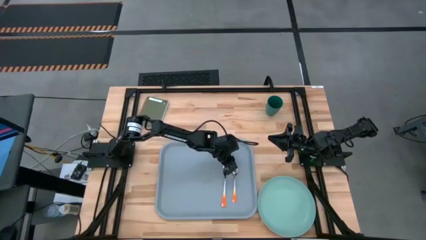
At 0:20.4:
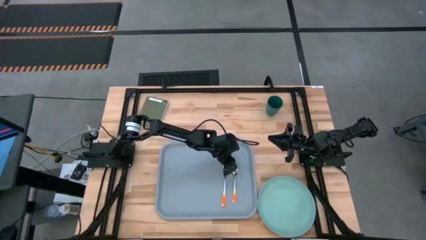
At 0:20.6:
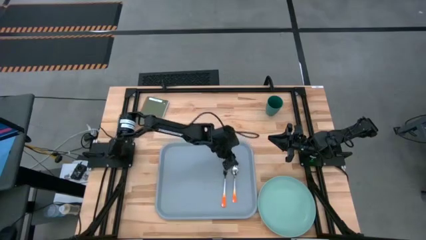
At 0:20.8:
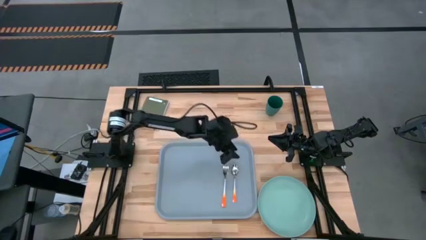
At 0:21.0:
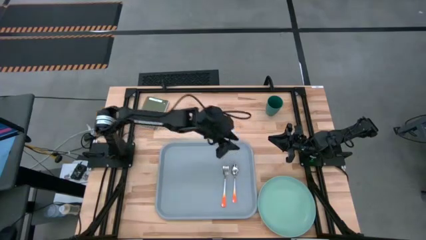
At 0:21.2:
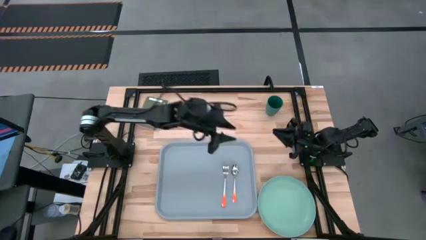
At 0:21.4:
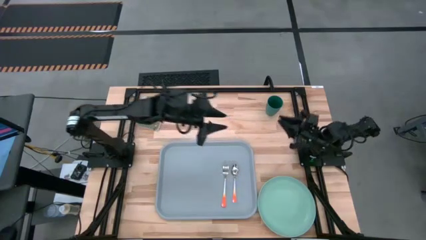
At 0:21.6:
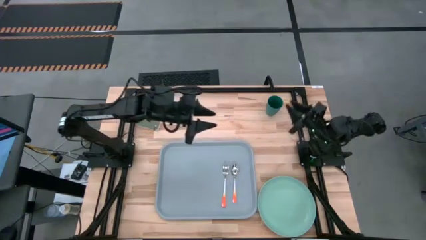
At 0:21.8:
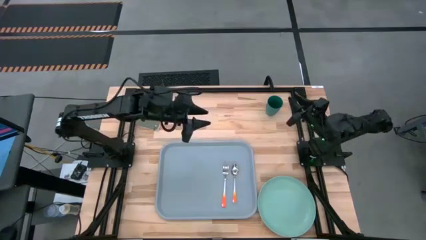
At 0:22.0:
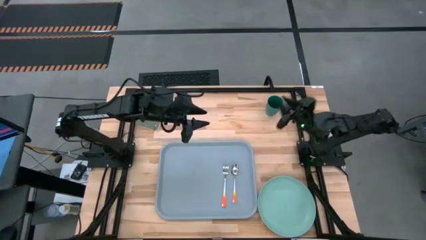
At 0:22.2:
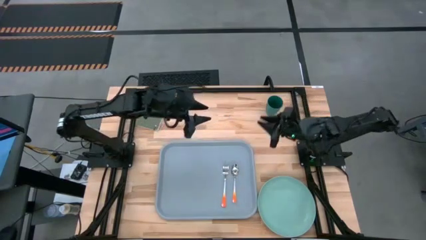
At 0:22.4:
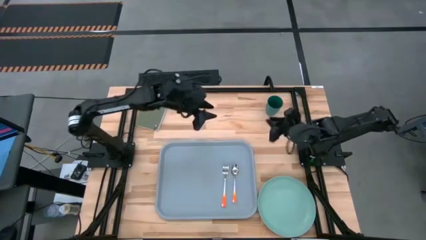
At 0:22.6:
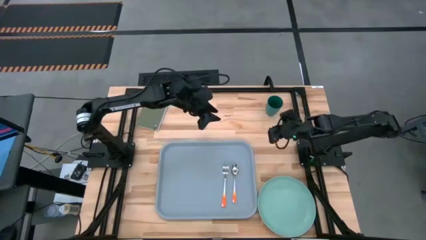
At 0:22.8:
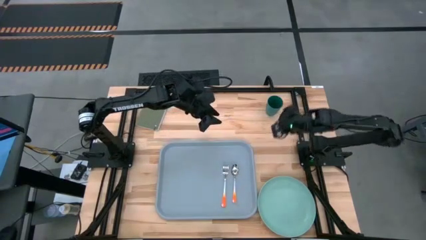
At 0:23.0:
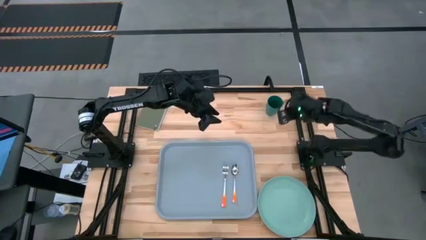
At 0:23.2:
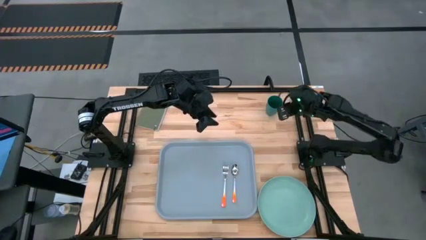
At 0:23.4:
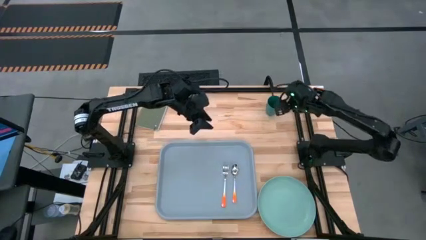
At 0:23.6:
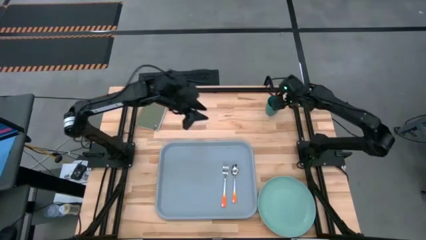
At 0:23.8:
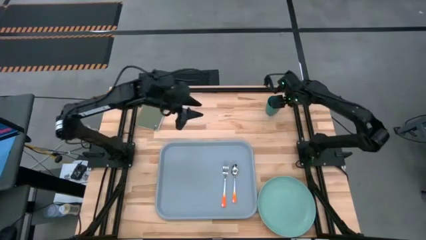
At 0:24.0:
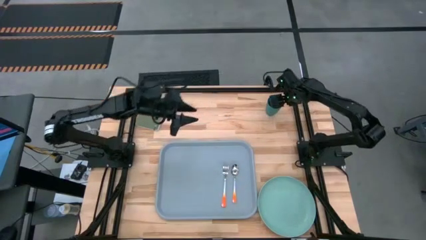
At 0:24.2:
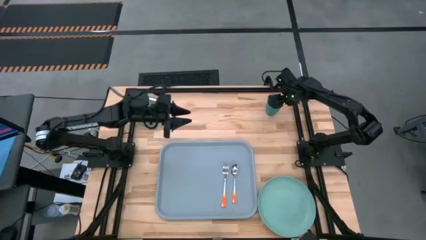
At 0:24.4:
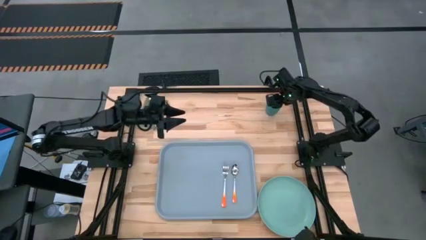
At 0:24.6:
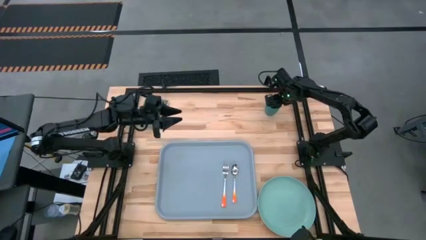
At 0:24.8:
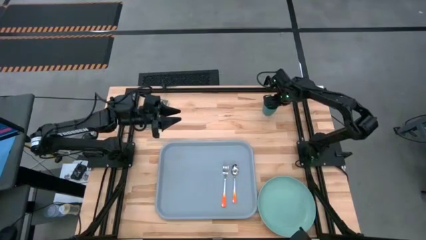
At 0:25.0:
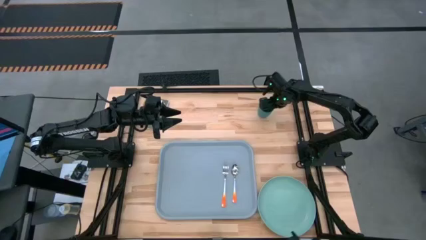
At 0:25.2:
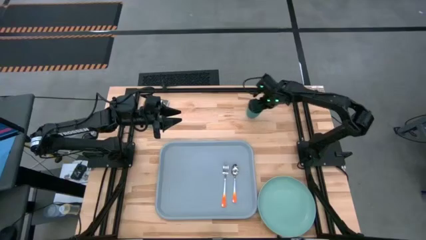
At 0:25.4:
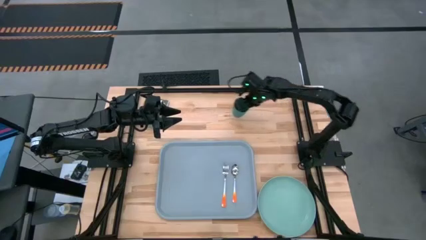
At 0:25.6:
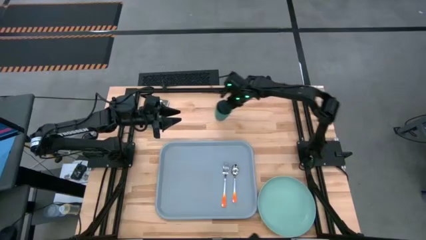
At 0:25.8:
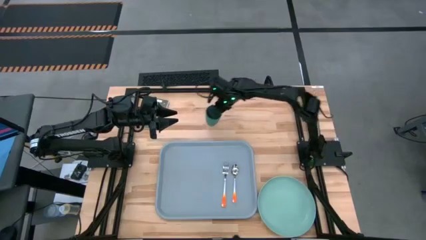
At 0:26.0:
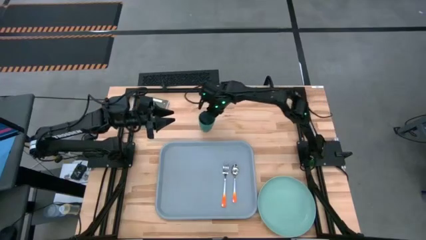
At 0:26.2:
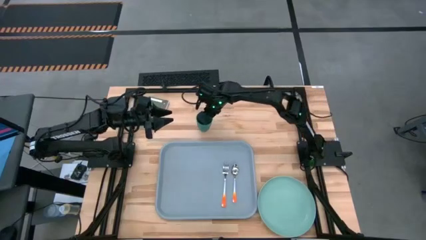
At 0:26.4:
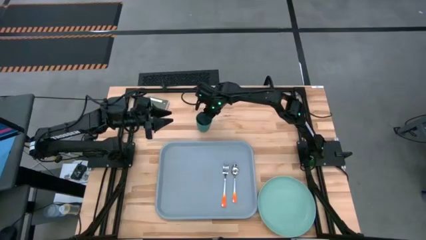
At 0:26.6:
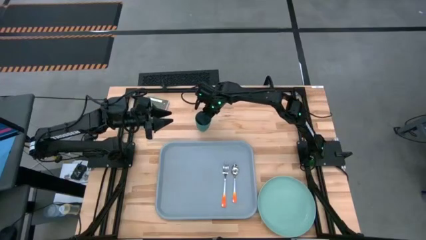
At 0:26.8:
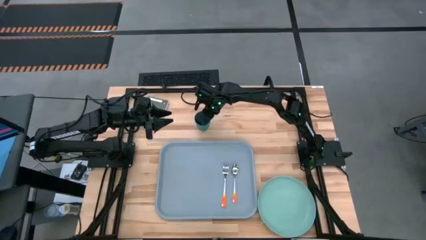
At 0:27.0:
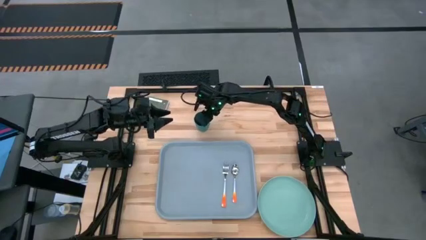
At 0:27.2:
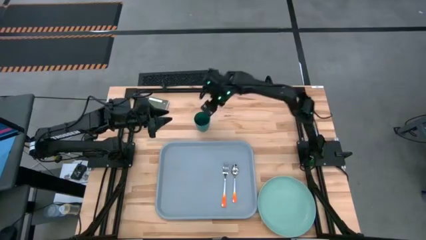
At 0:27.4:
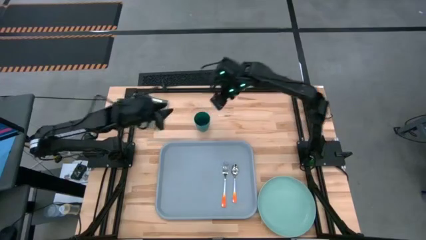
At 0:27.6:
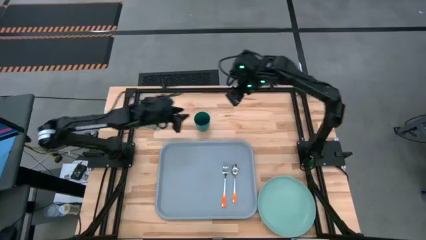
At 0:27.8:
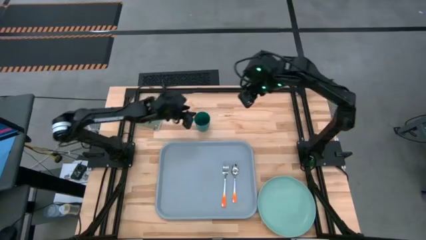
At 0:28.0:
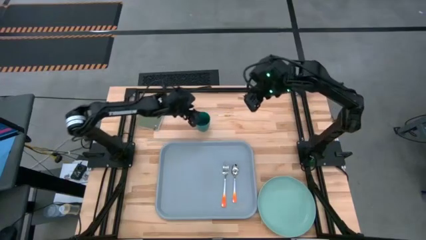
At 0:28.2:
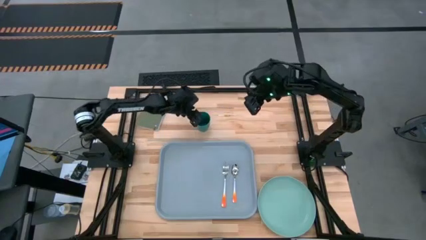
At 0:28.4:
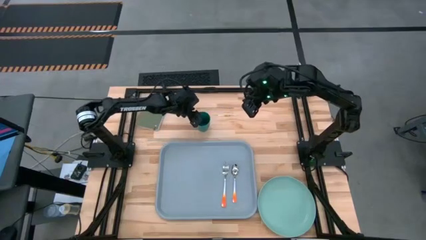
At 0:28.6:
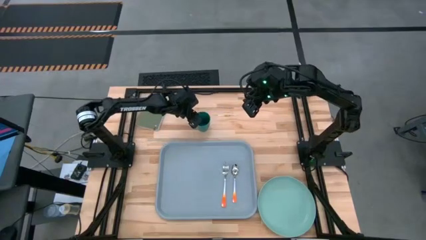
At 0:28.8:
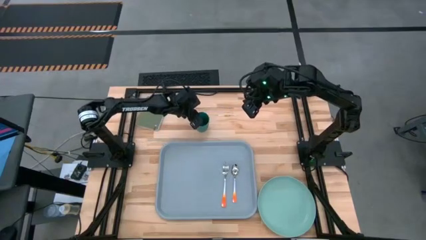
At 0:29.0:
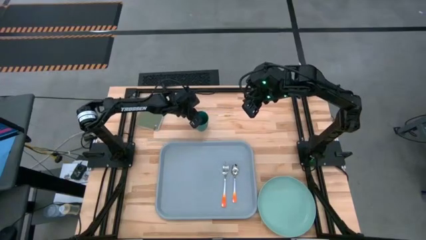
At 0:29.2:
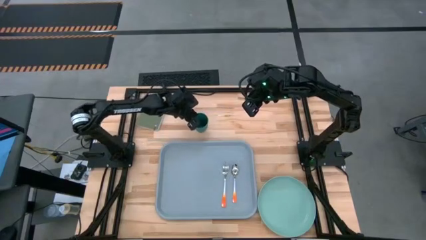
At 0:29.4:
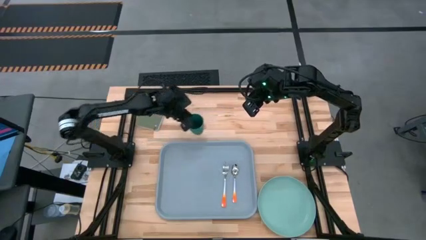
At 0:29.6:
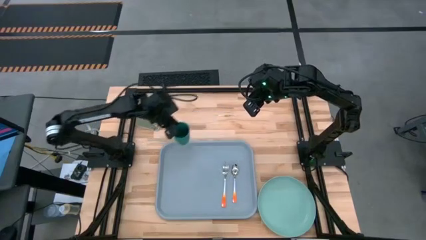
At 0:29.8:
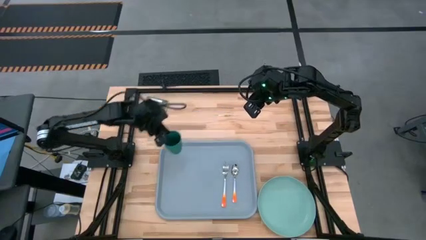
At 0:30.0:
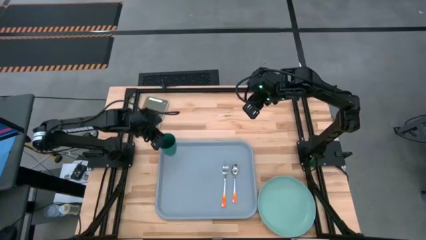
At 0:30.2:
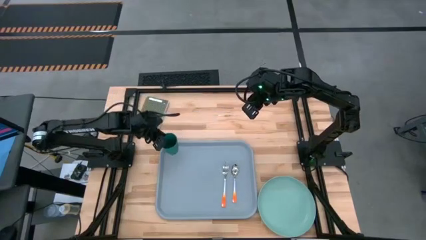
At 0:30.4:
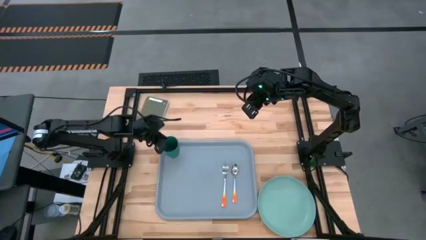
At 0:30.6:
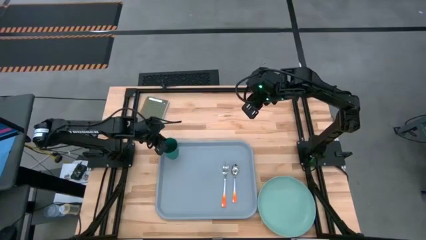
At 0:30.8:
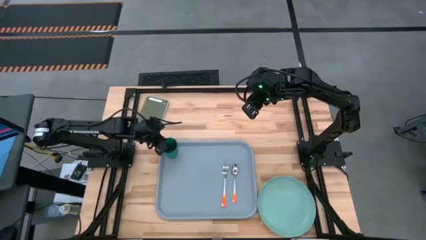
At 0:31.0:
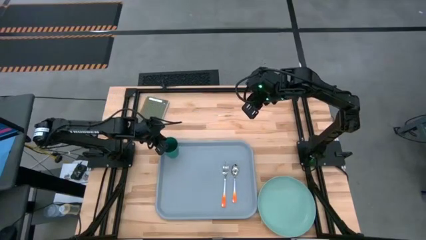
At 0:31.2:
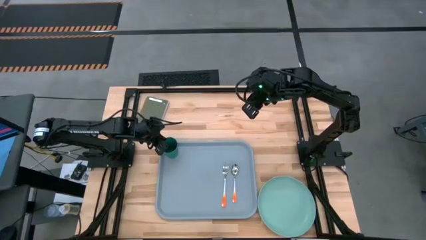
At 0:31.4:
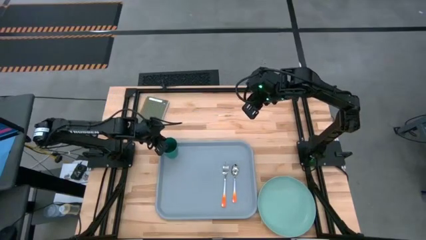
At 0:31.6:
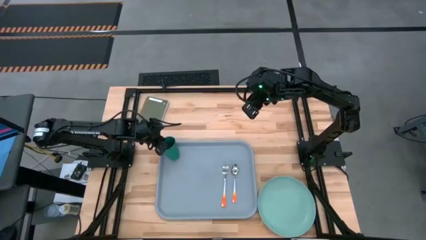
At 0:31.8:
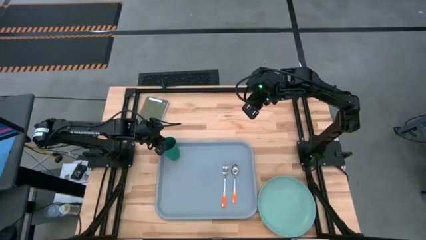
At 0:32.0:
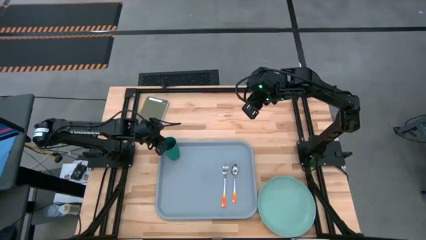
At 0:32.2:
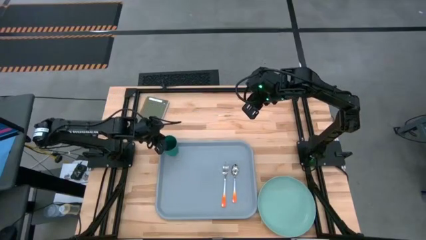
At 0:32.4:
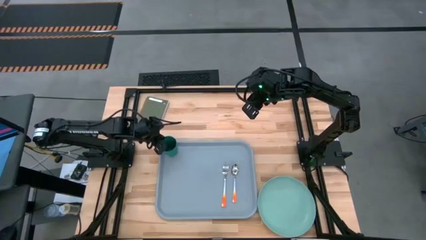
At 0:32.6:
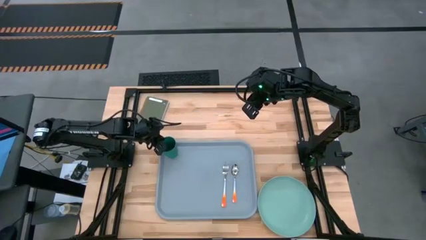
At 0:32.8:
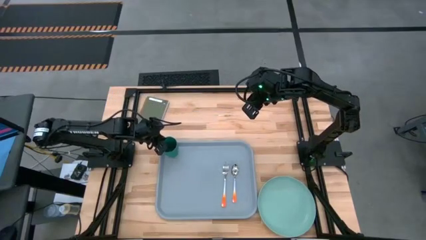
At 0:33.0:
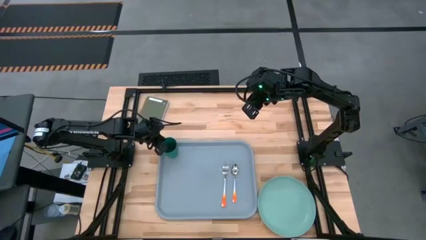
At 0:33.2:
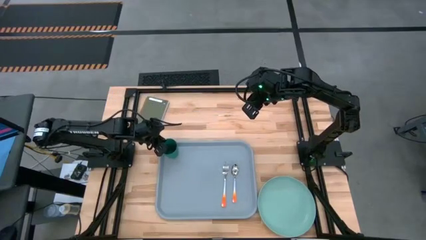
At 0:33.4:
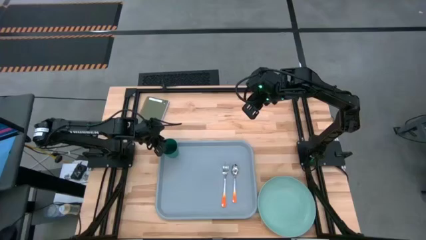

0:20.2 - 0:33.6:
Task: Pick and place plate/cup/fork/spoon on tray
Put the green glass in the top left corner of the light gray tray
